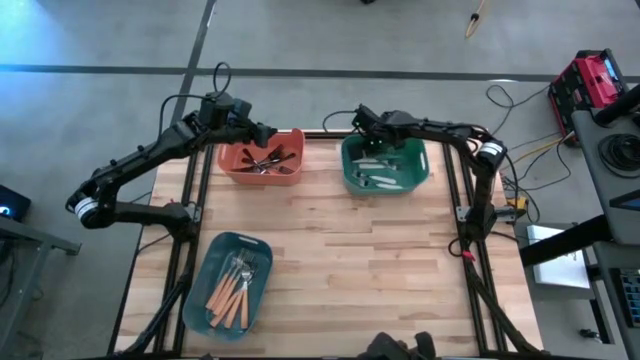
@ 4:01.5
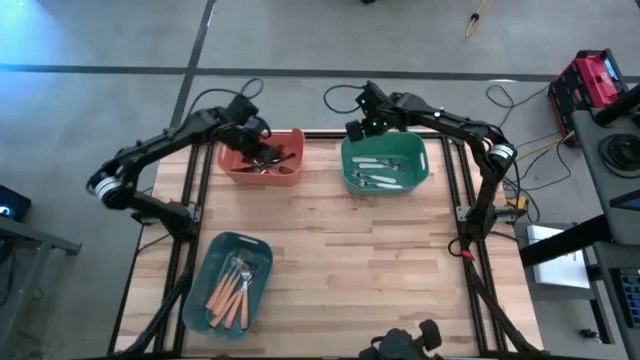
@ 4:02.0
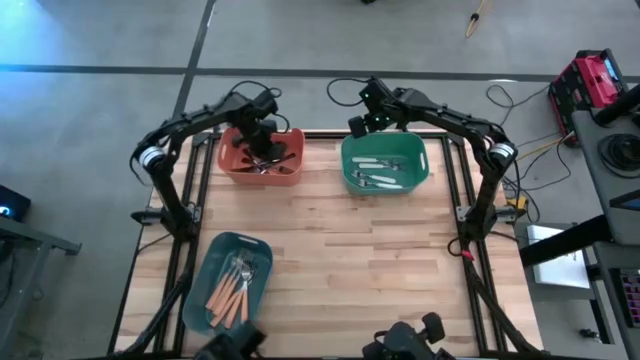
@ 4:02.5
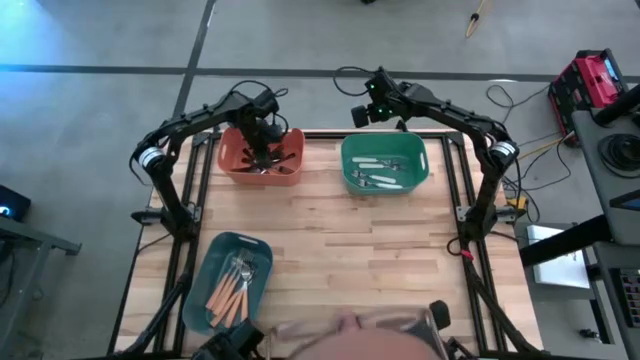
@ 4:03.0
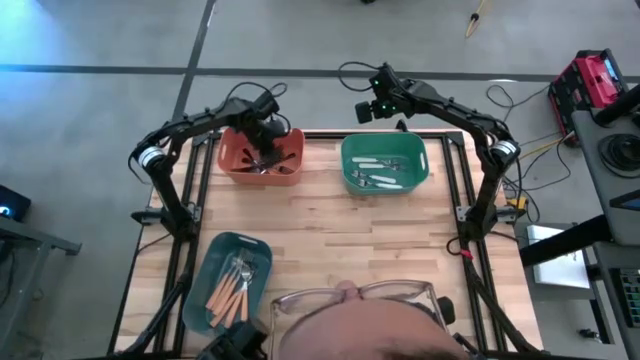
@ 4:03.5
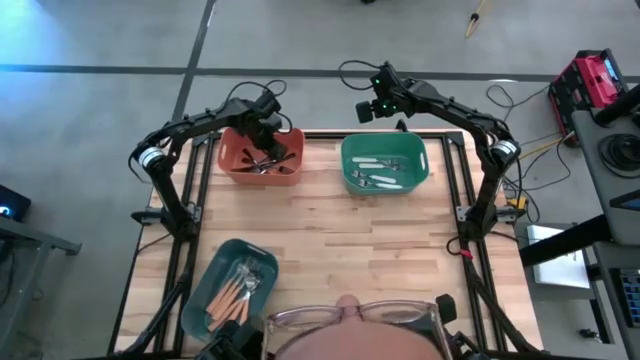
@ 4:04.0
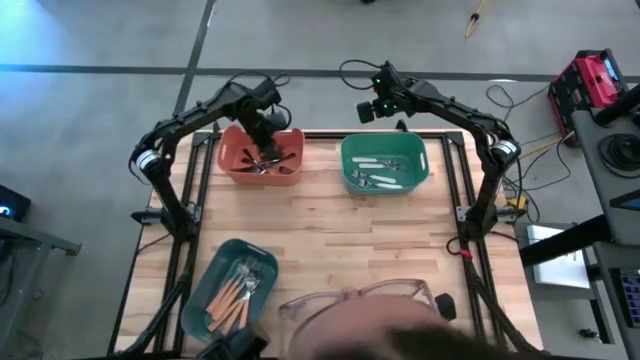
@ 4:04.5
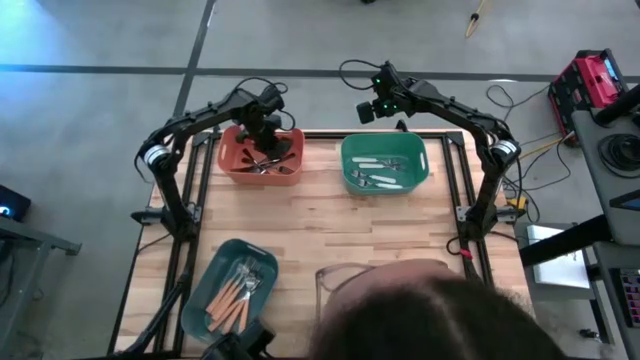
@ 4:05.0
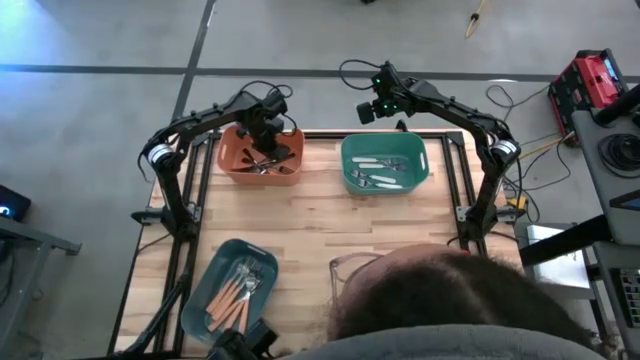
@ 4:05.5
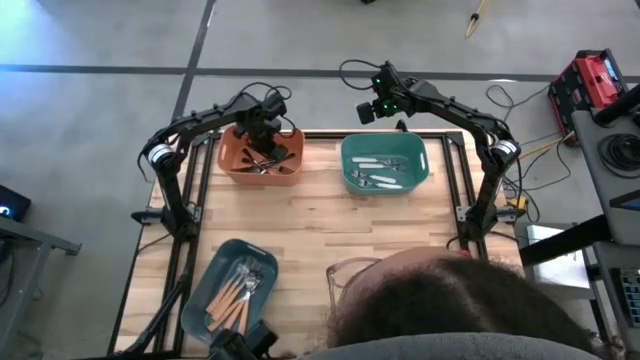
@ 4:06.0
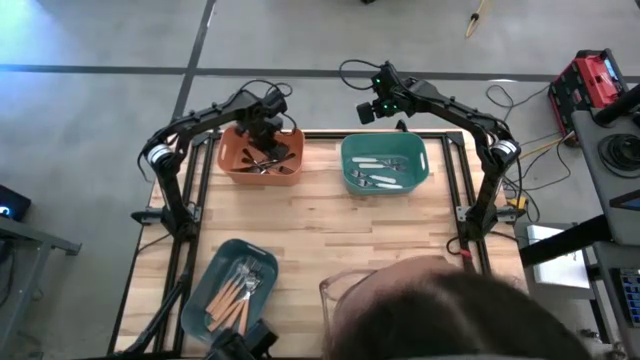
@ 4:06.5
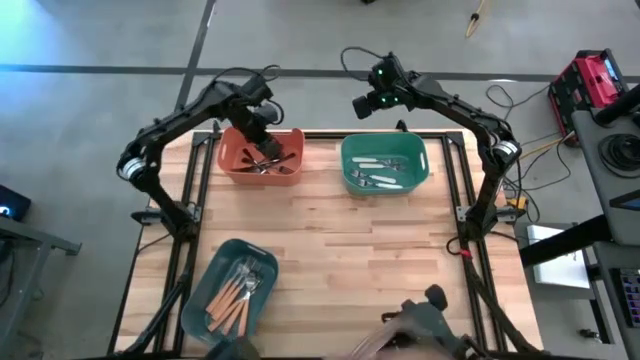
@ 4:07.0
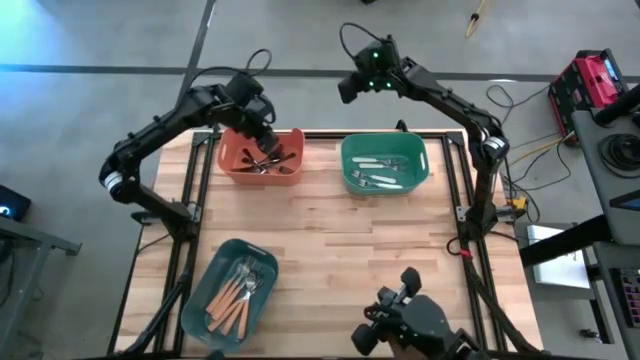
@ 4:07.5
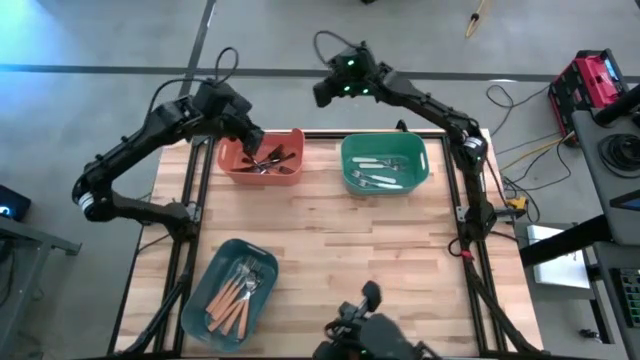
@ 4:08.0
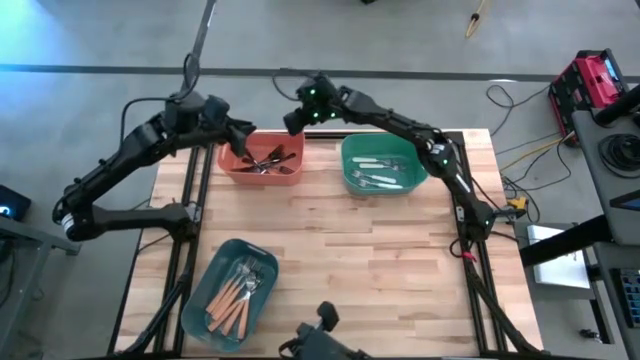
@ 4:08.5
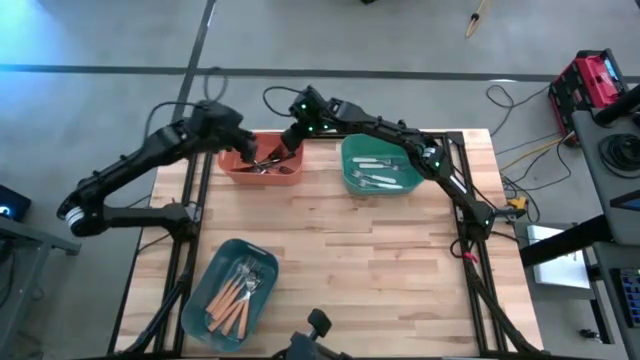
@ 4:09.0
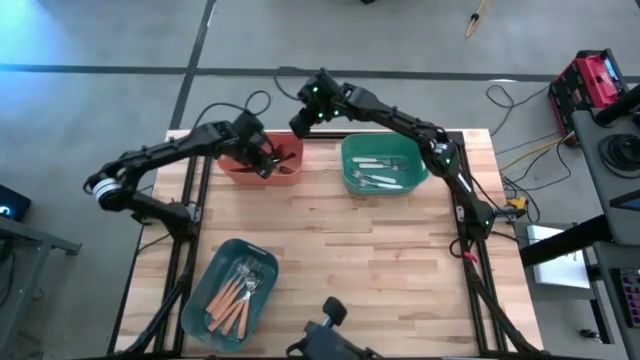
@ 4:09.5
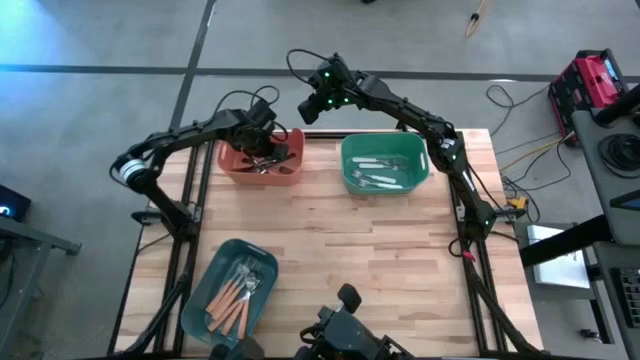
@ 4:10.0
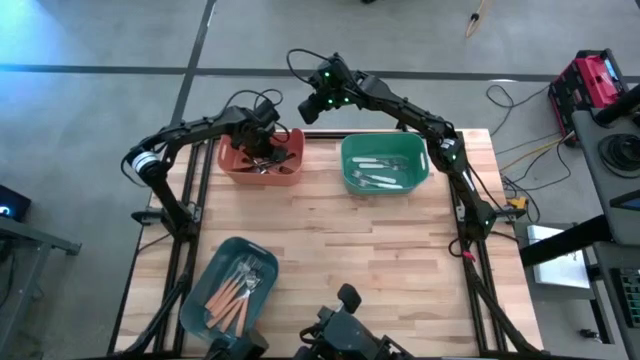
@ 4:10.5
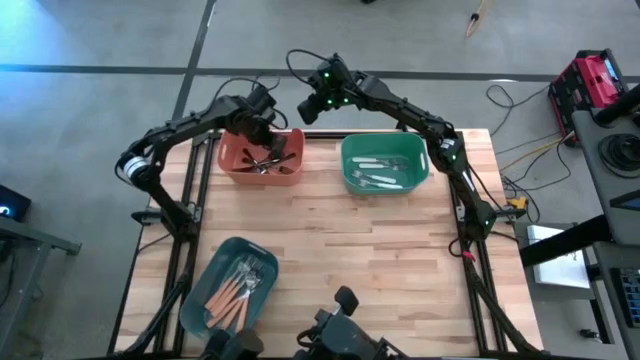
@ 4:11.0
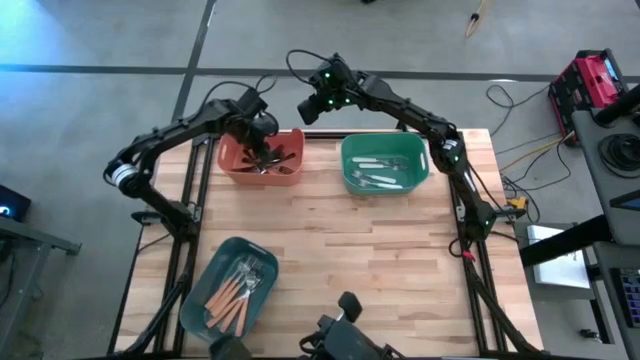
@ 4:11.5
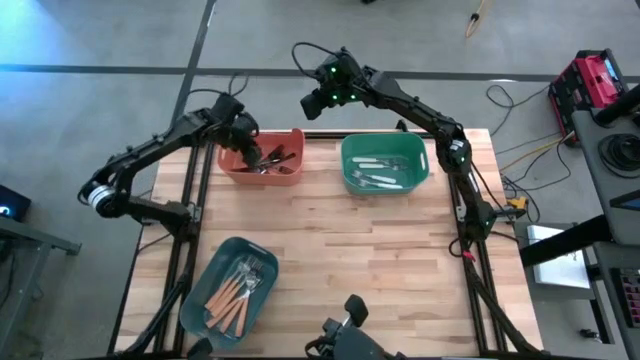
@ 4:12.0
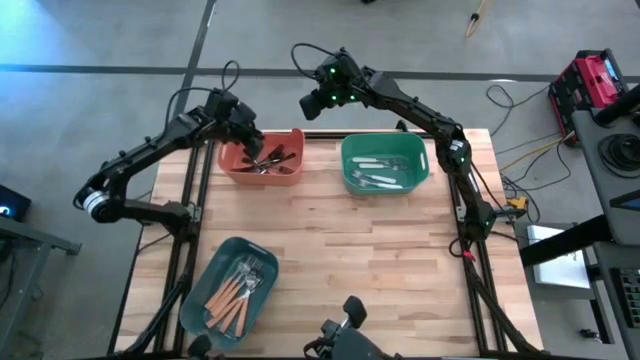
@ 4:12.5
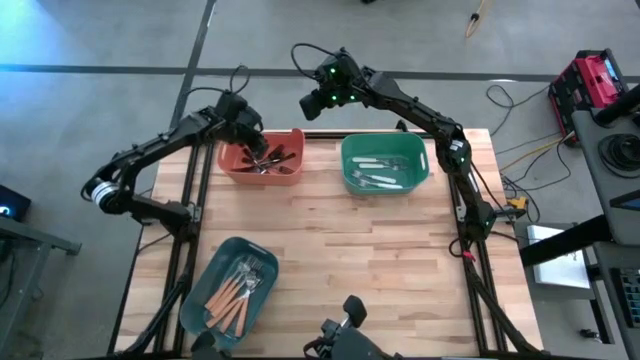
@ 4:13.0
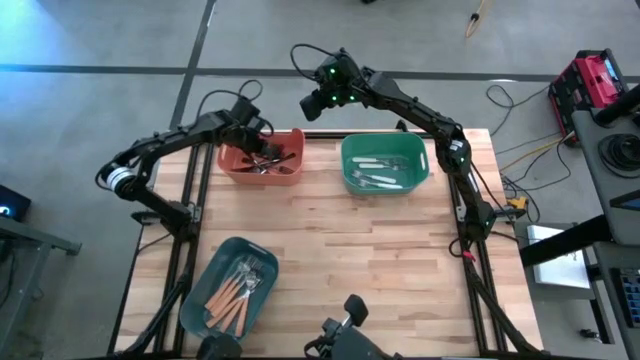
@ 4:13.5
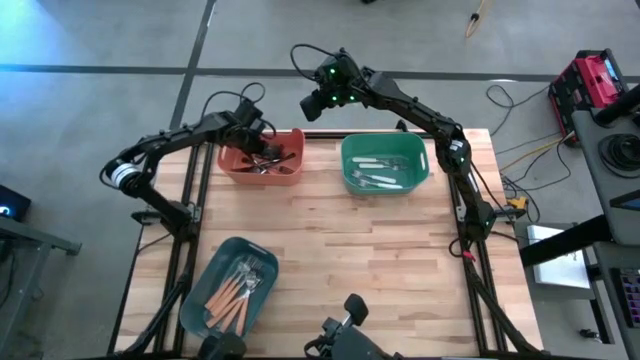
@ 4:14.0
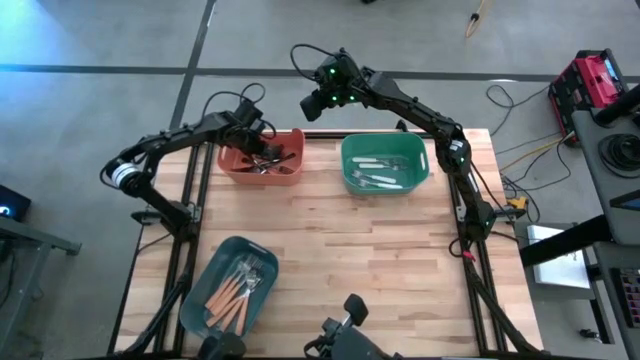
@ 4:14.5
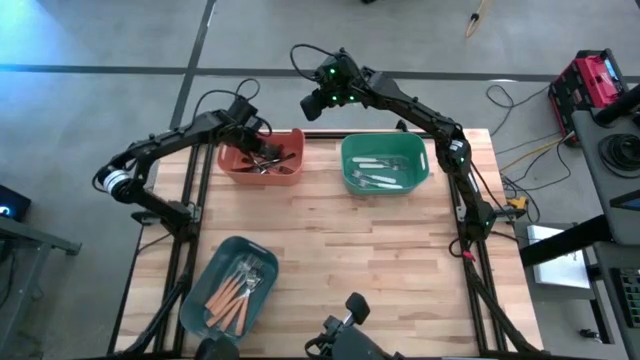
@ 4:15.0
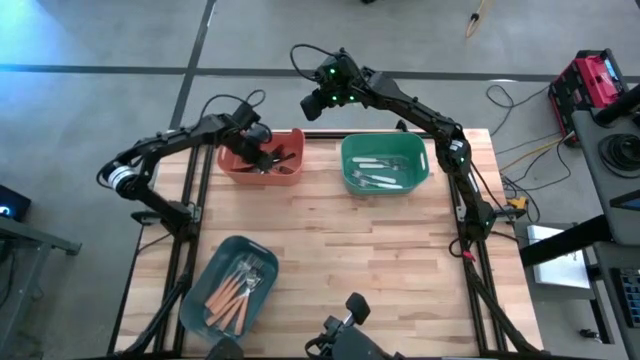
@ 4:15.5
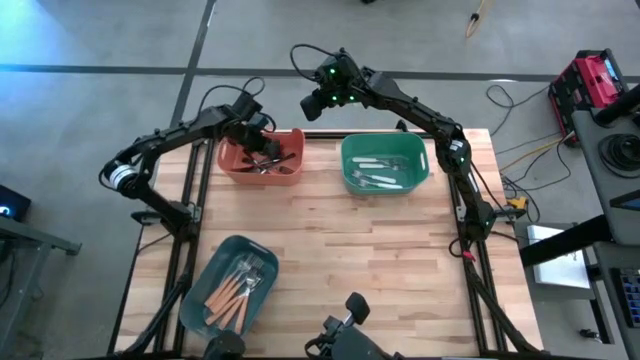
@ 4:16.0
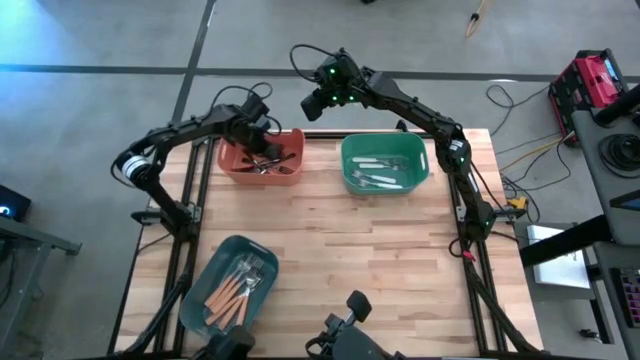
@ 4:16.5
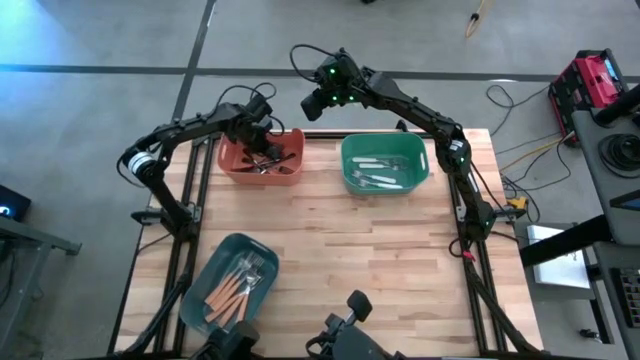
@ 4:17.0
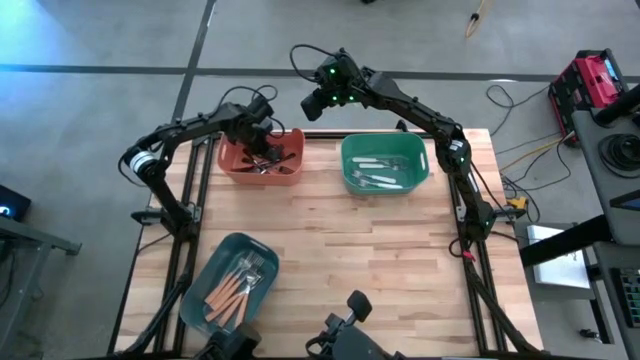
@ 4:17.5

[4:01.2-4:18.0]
Task: Sort silverware by color (type)
Adjust the black forks in the orange bin
